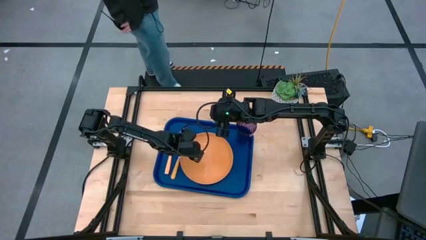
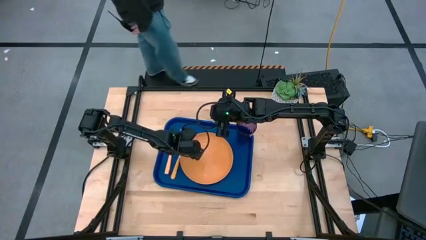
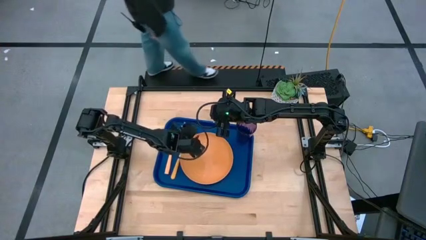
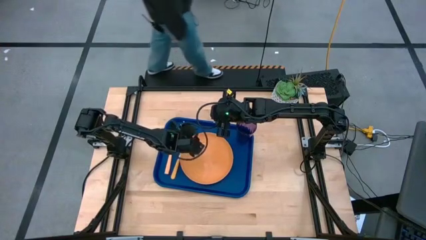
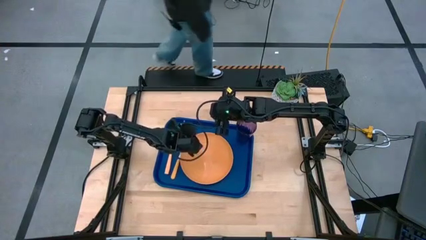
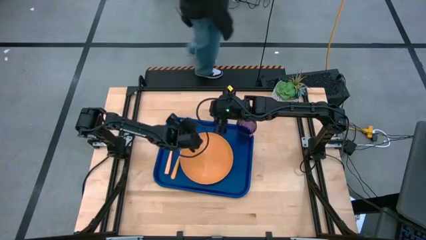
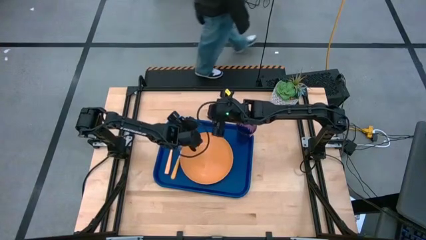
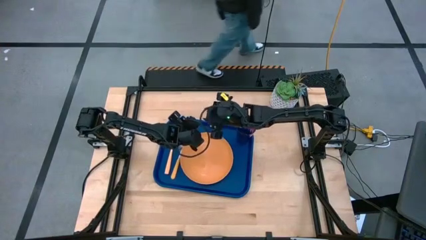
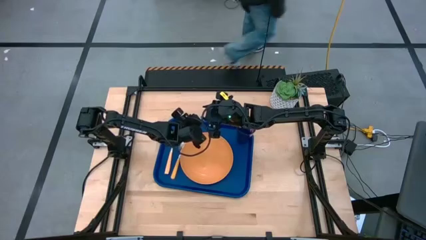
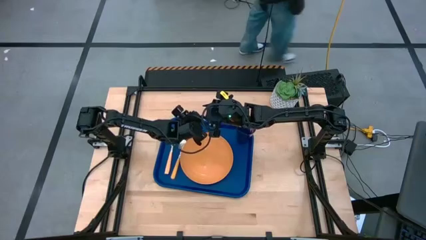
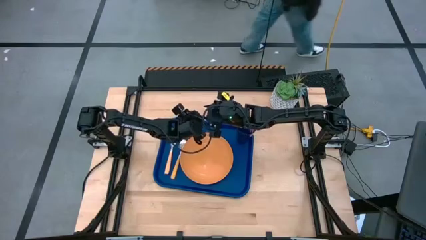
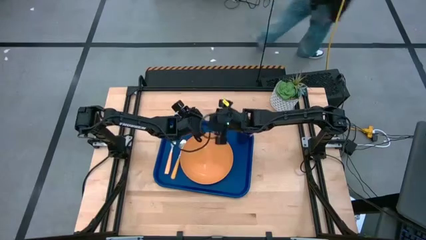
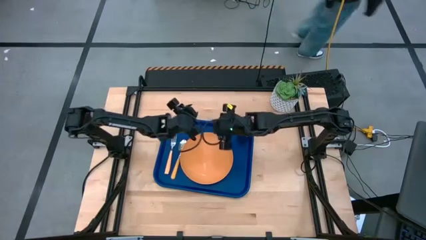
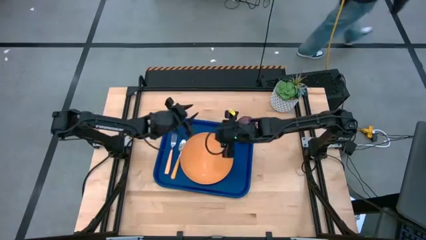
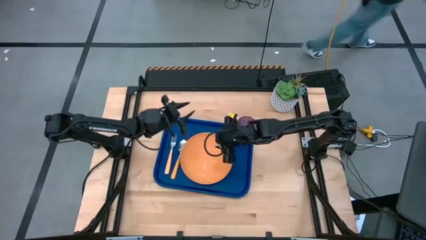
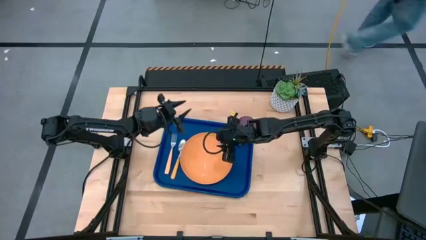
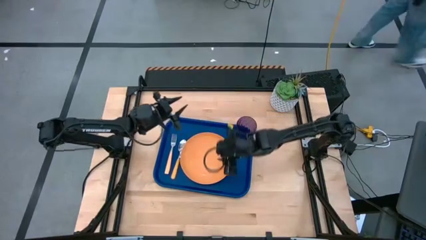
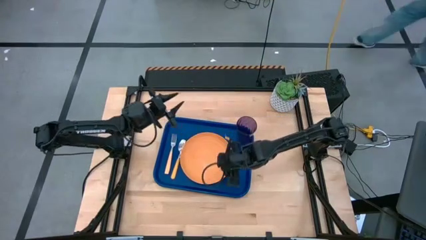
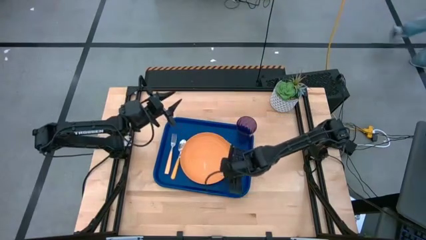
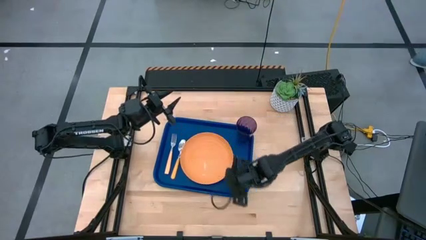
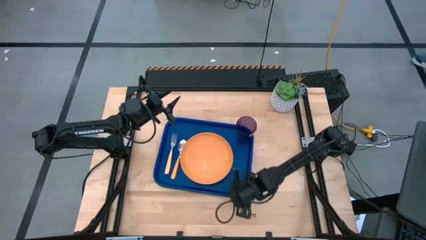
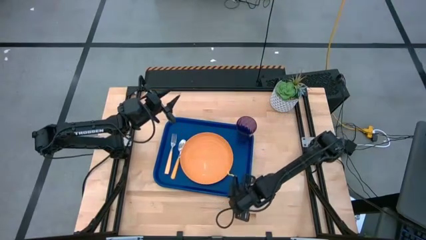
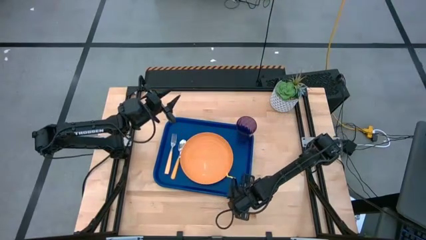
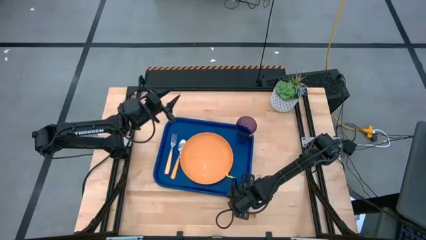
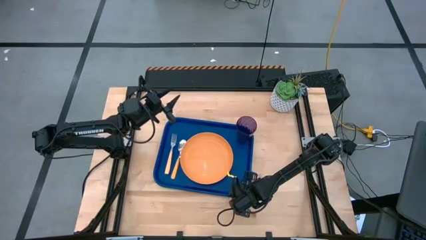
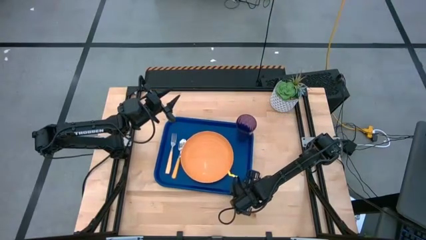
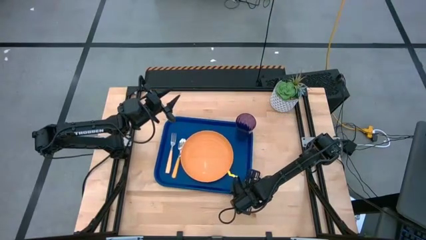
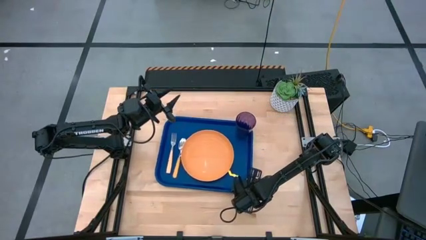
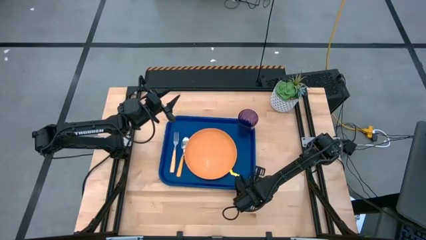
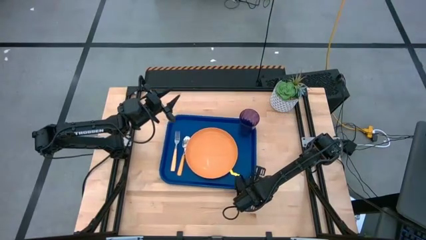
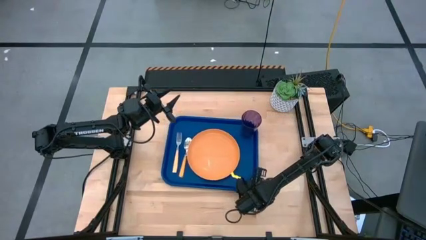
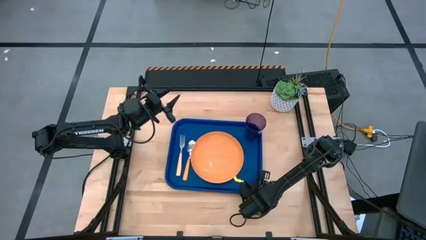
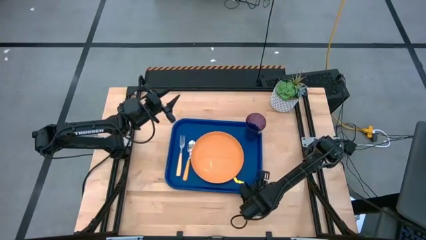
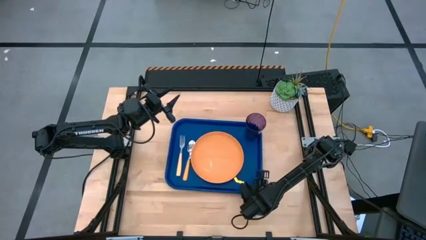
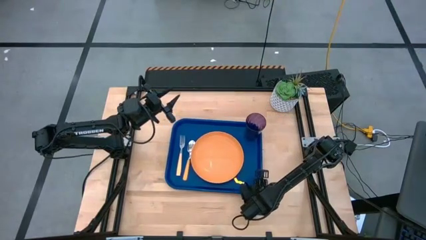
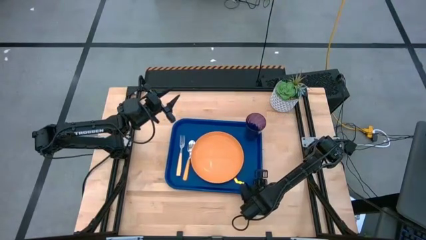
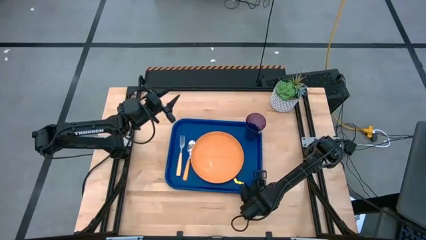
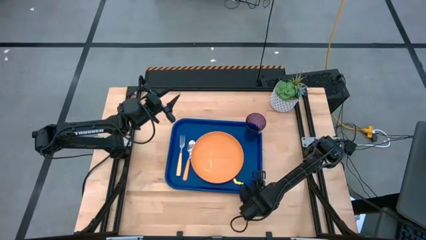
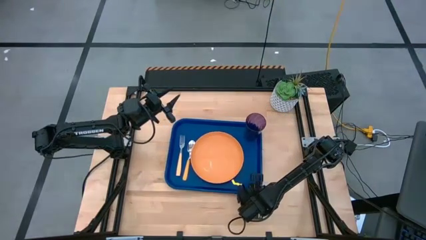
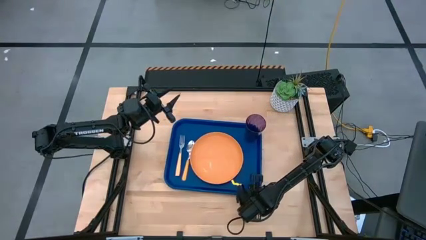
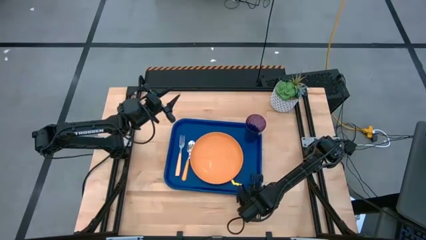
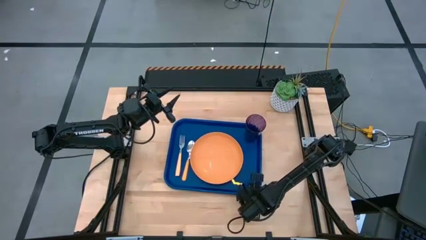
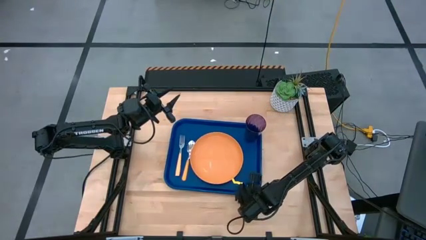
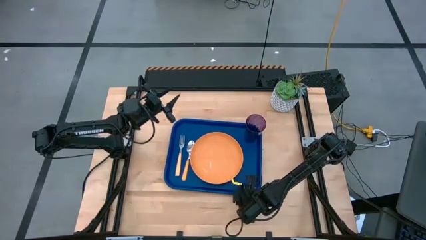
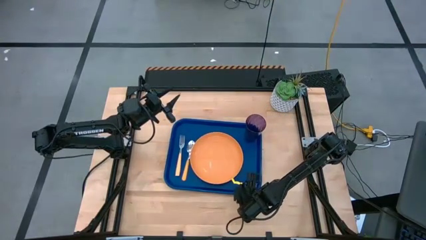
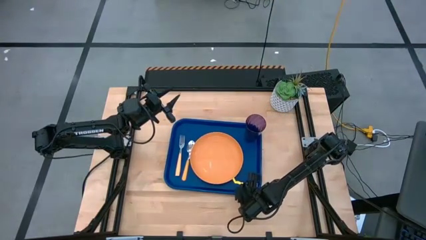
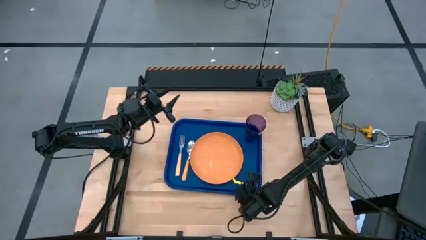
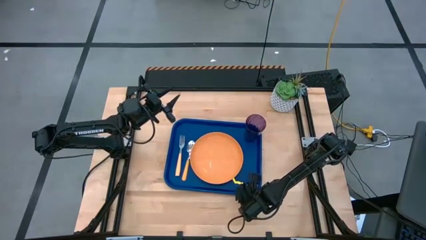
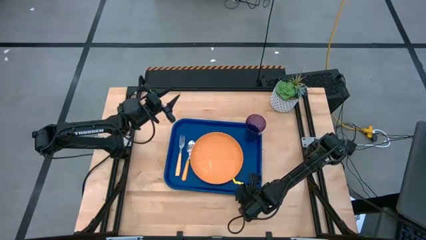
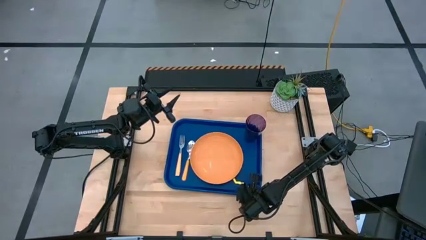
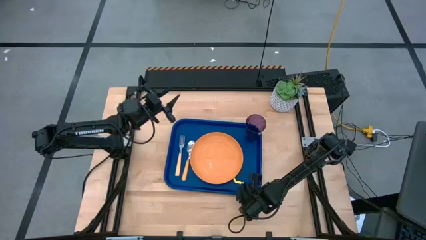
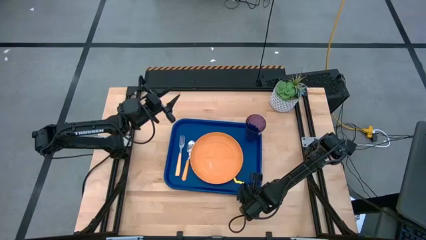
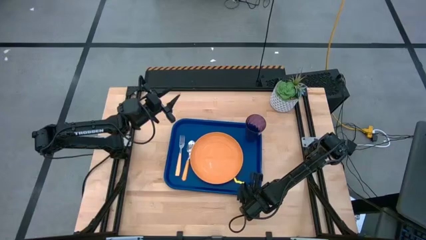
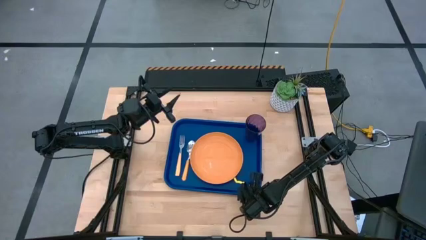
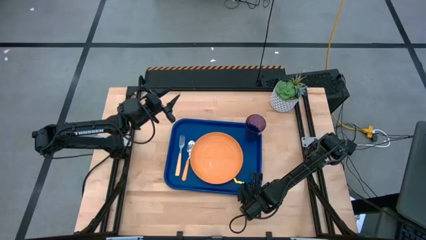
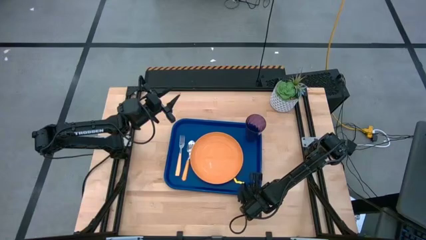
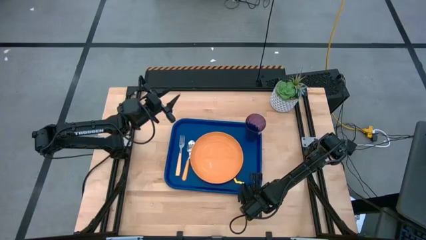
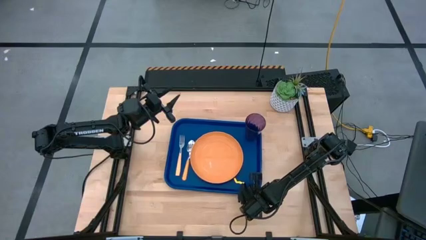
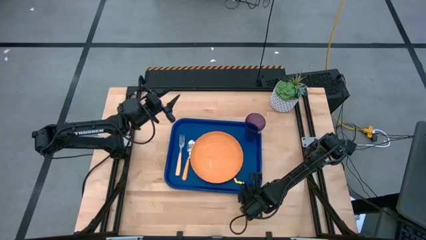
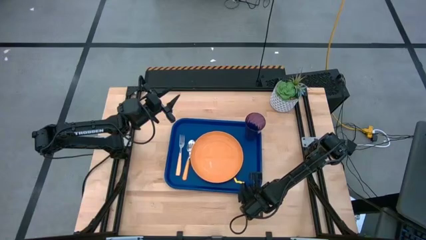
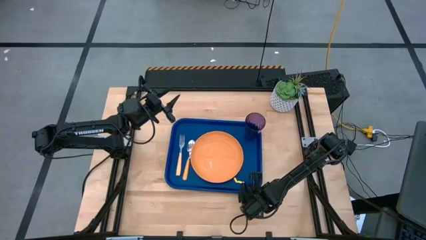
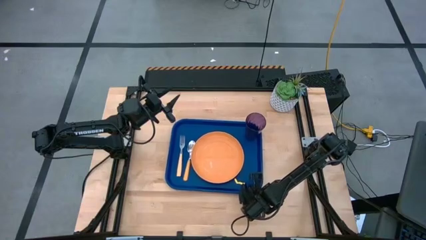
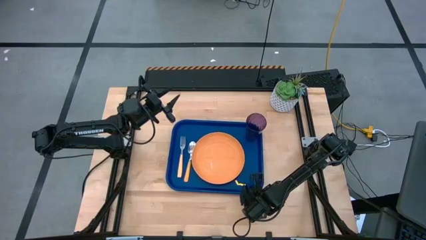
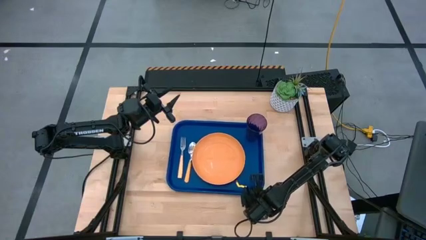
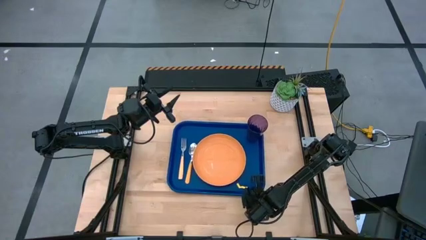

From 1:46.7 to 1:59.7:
Task: Pick and place plate/cup/fork/spoon on tray
Adjust the blue serving tray

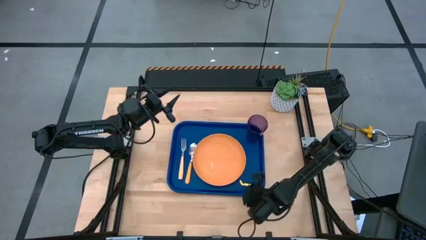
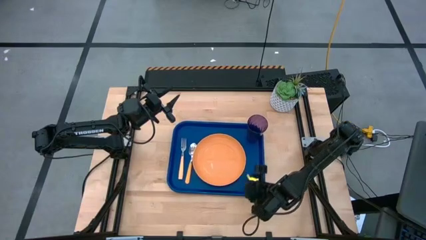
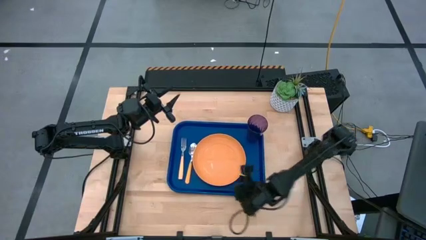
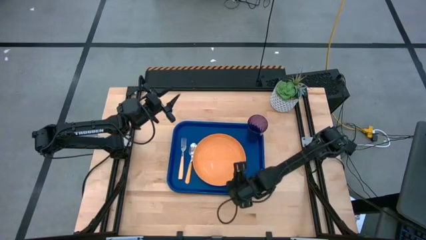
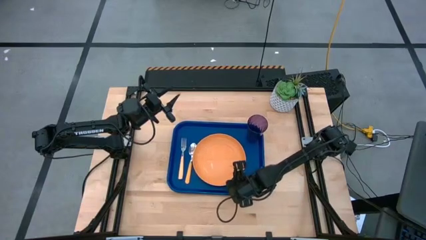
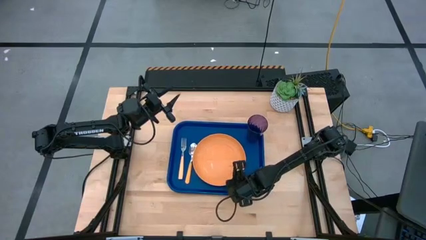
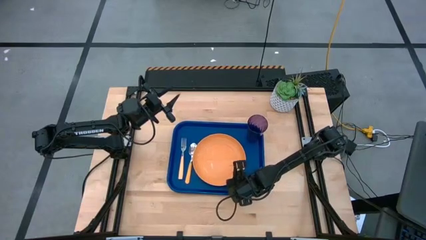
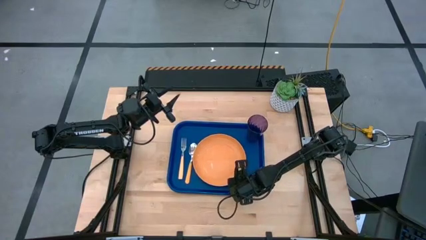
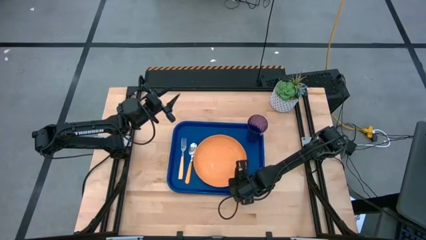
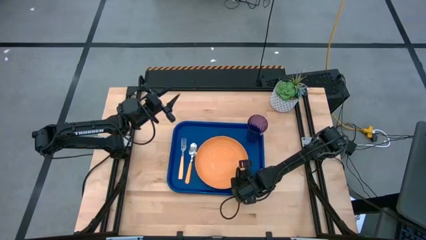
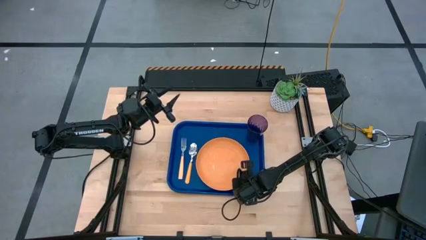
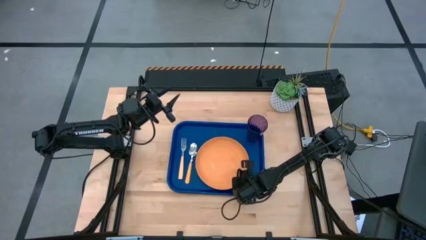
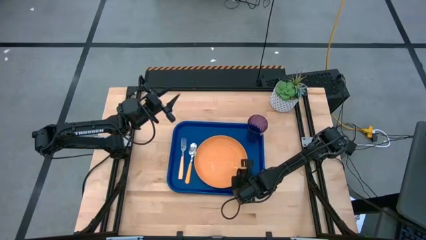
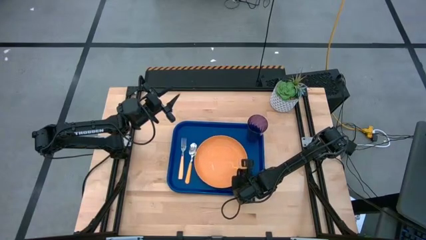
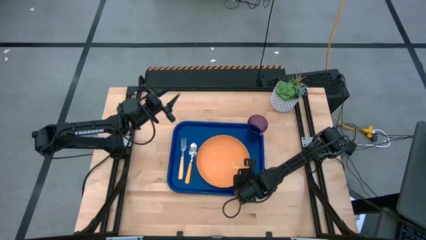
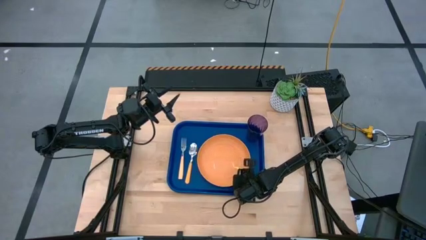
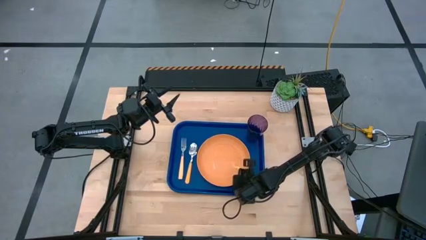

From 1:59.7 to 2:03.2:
Adjust the orange plate on the blue serving tray
